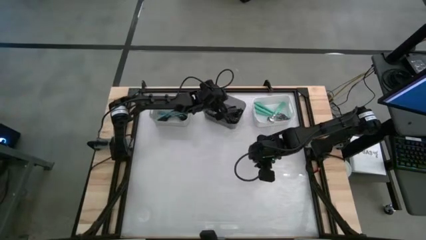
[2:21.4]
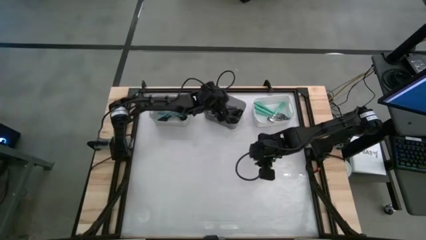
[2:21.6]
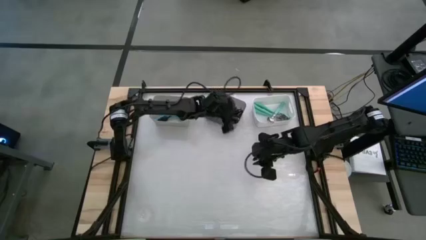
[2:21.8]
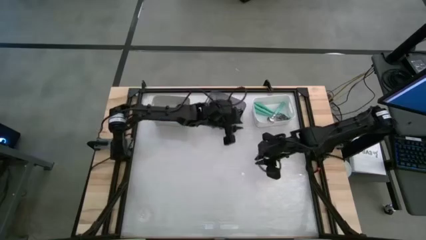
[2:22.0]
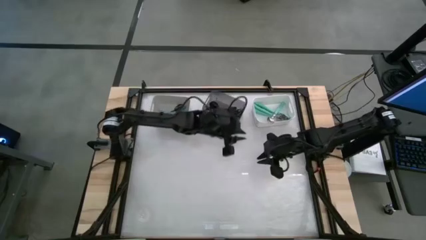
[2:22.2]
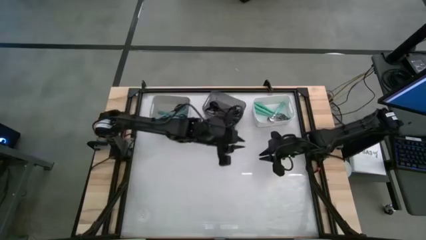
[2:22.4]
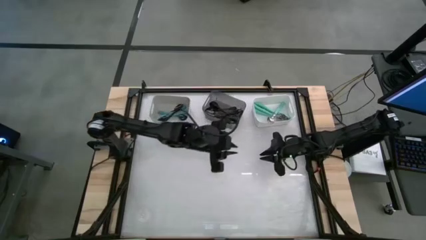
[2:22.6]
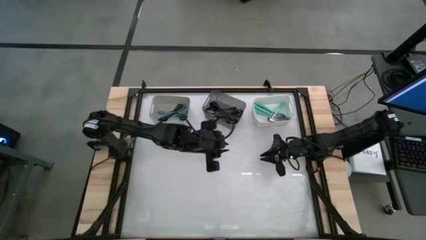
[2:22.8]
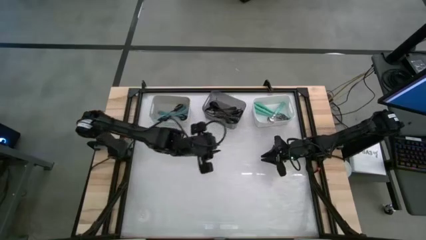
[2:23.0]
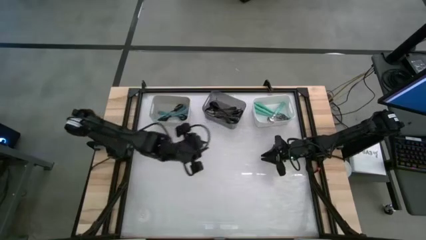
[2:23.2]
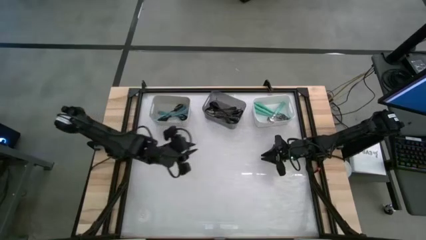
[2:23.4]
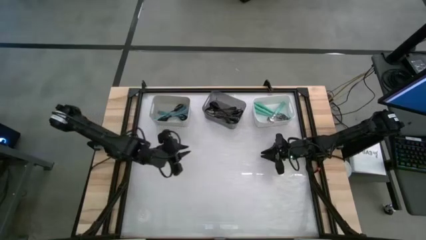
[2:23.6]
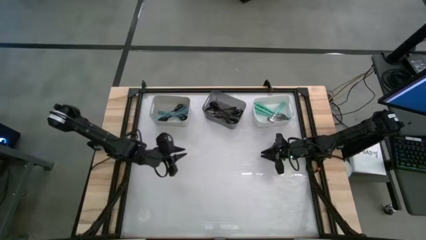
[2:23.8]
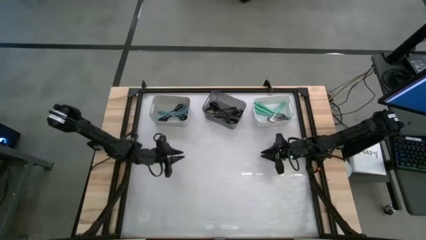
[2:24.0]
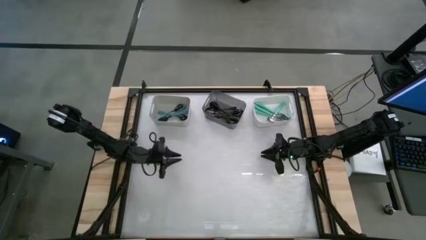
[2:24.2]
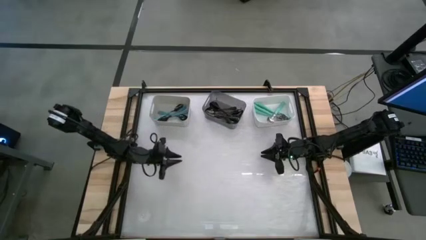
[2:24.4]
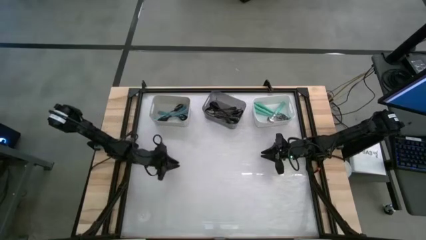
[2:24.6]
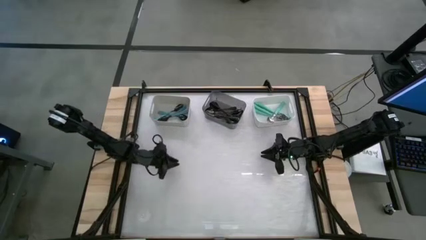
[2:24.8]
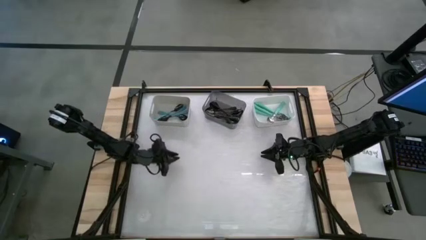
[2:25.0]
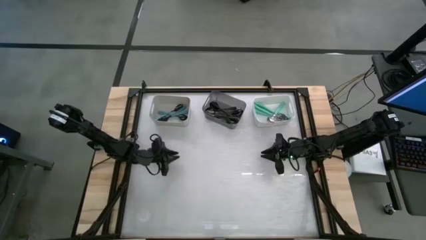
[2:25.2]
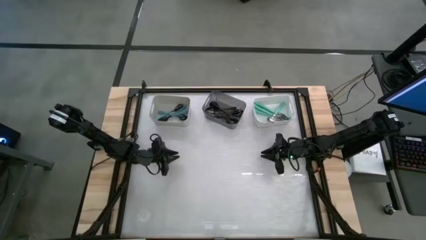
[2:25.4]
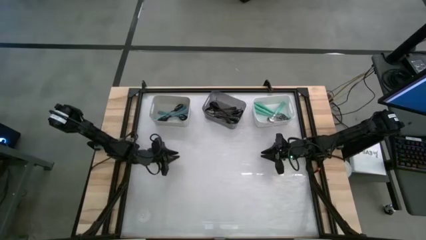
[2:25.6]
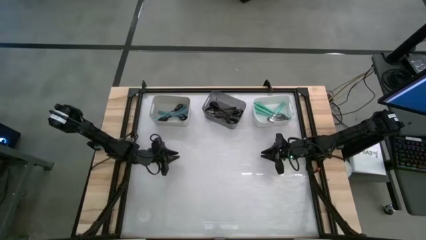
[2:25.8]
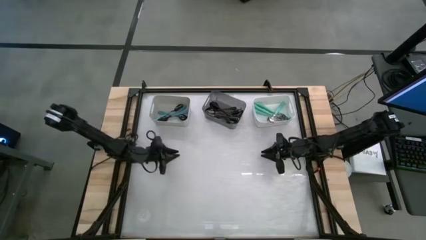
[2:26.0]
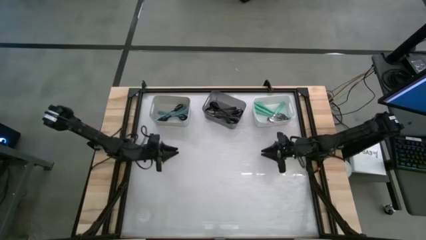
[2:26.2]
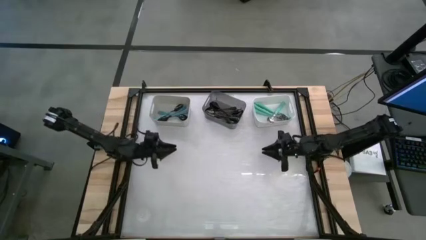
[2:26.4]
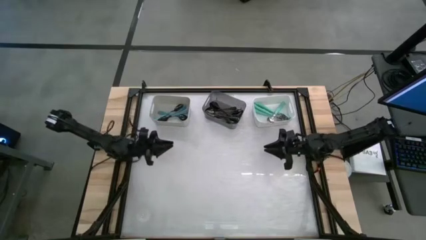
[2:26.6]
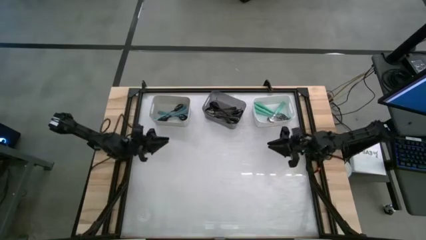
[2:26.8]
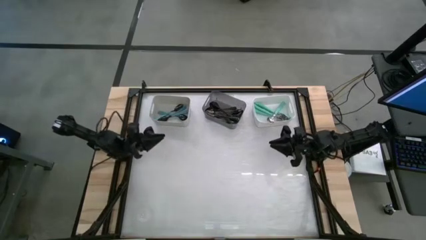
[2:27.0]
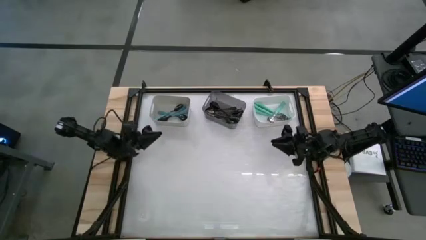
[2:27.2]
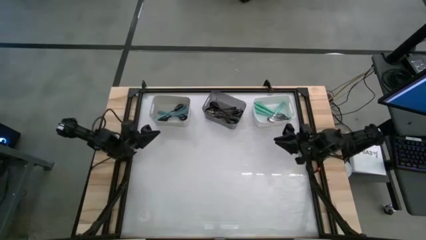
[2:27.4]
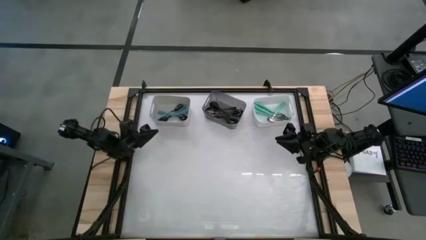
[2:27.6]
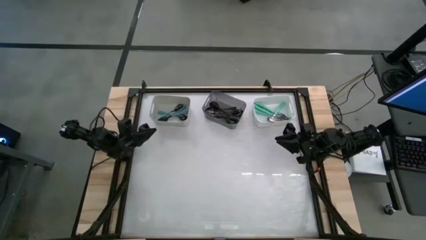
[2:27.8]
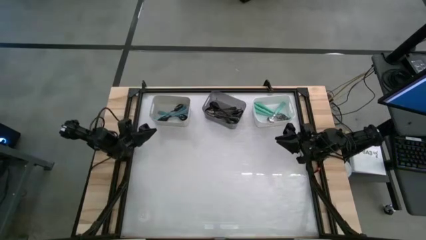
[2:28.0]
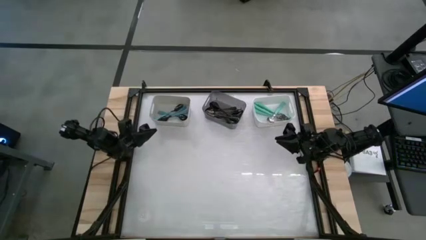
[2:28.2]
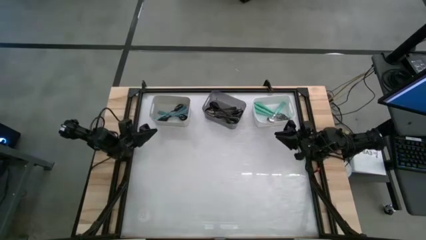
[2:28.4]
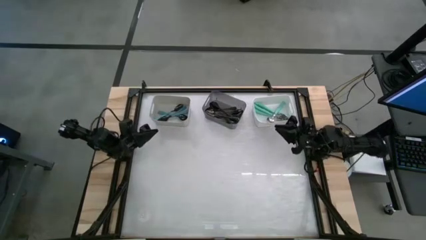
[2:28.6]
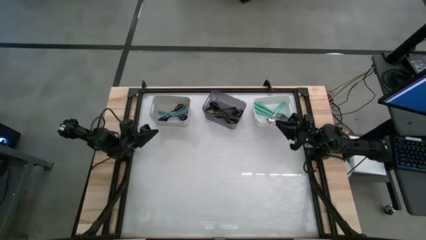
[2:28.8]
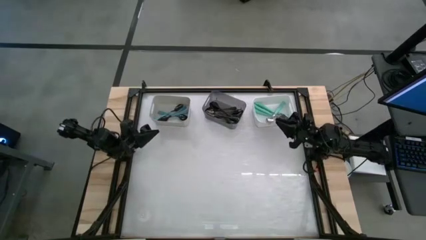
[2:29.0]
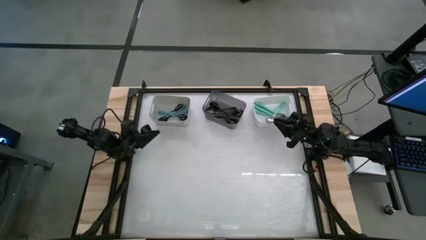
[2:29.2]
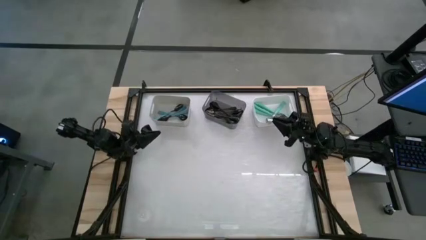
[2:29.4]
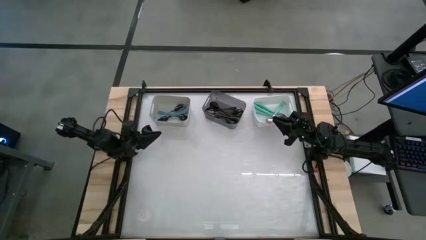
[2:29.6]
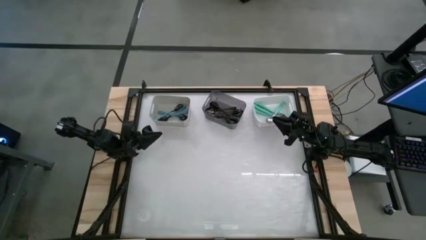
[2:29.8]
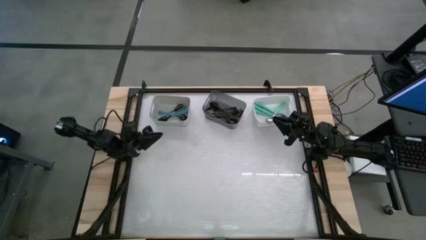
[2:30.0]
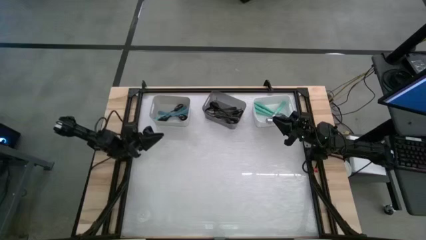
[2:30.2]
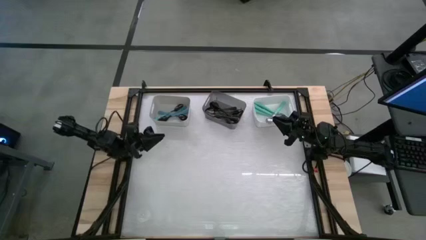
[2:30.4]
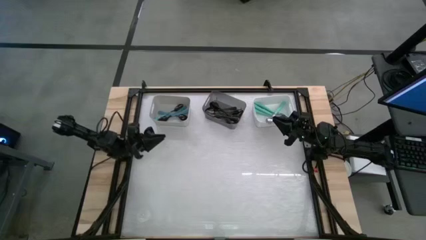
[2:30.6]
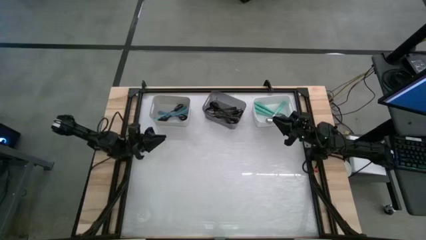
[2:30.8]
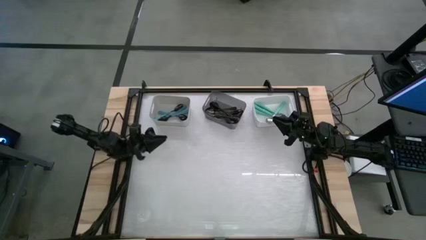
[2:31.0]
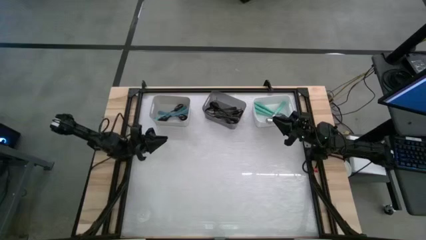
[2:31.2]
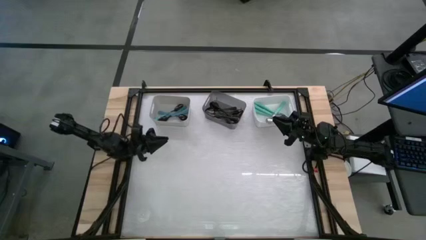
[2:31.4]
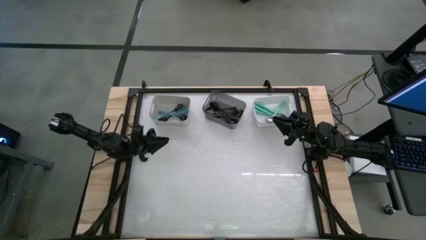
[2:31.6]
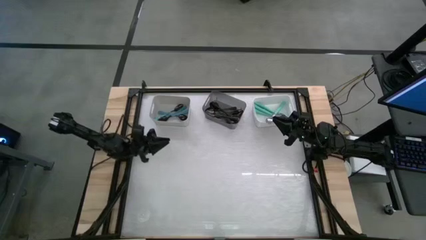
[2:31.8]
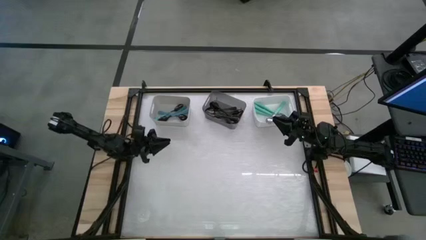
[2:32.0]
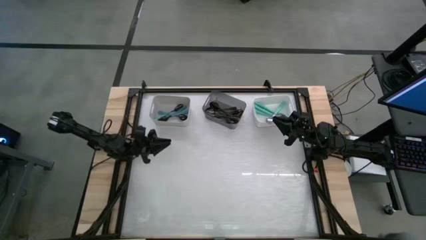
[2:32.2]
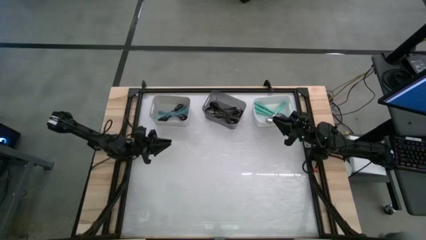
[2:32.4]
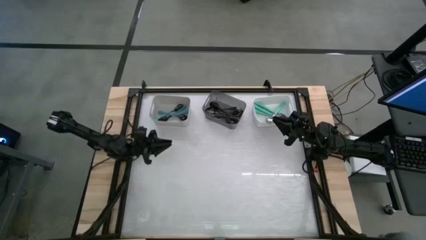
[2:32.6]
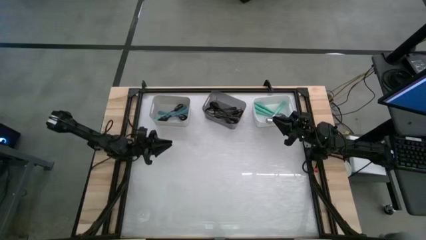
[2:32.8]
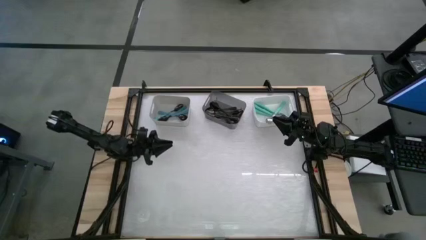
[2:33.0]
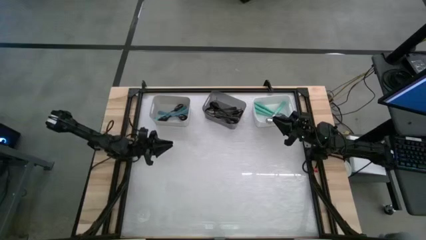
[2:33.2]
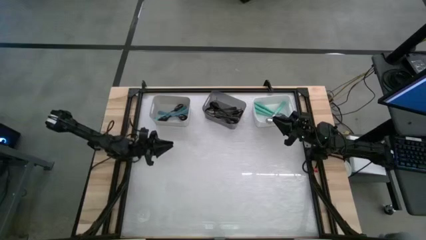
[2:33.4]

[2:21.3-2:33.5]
Task: Sort silverware by color (type)
Return to Home Position
